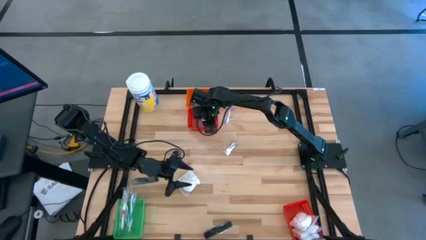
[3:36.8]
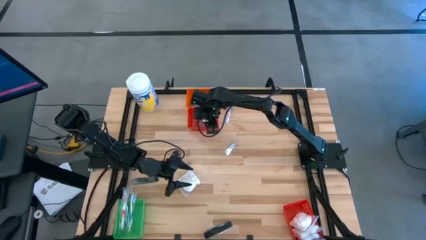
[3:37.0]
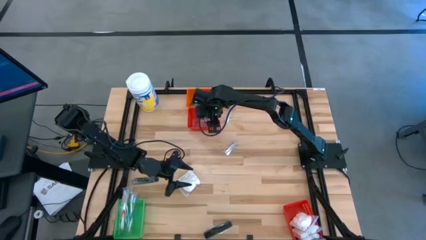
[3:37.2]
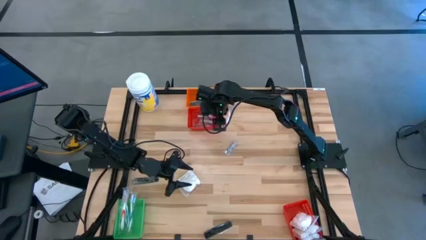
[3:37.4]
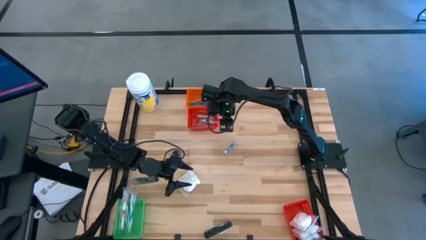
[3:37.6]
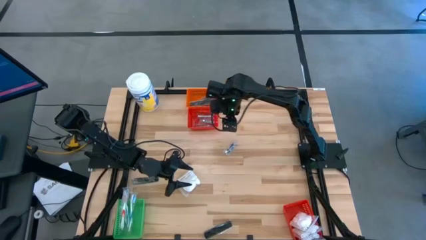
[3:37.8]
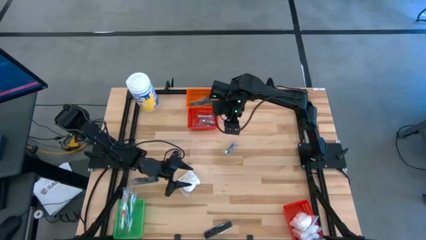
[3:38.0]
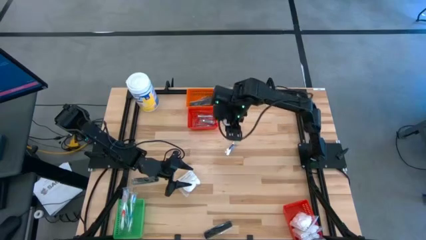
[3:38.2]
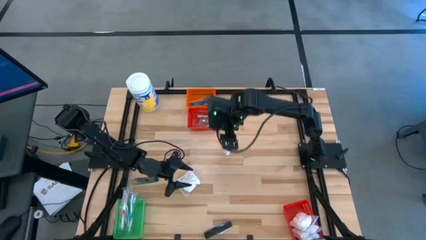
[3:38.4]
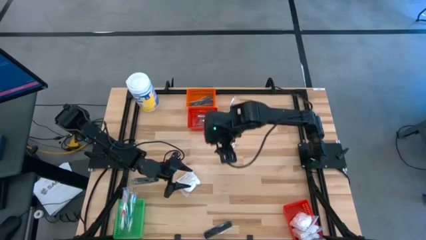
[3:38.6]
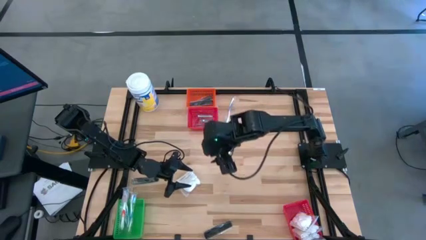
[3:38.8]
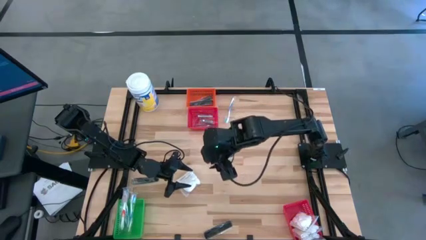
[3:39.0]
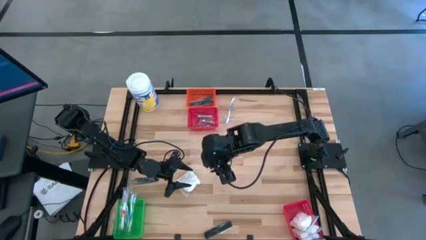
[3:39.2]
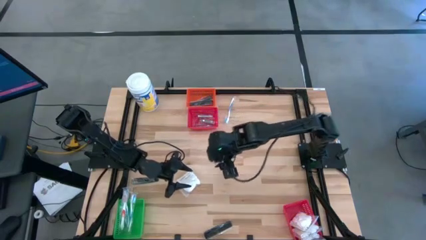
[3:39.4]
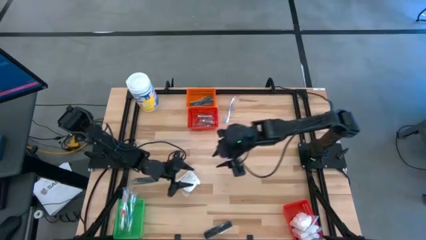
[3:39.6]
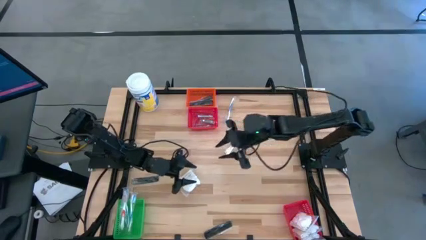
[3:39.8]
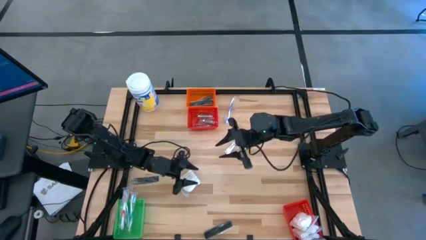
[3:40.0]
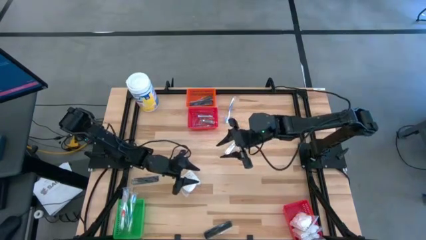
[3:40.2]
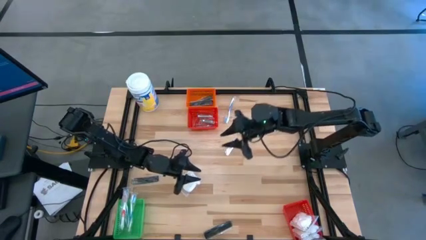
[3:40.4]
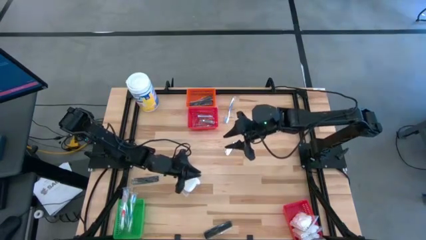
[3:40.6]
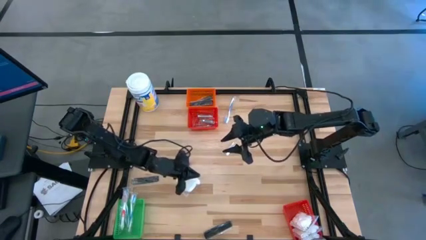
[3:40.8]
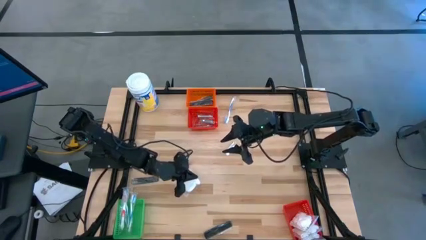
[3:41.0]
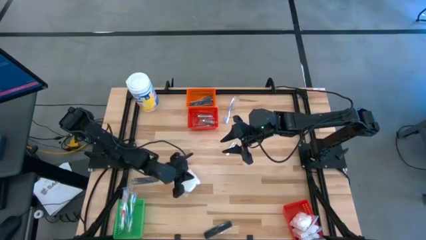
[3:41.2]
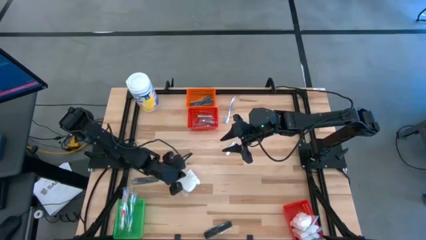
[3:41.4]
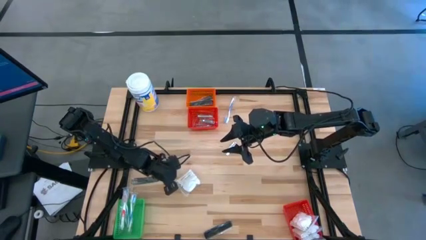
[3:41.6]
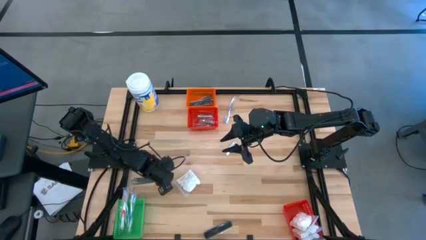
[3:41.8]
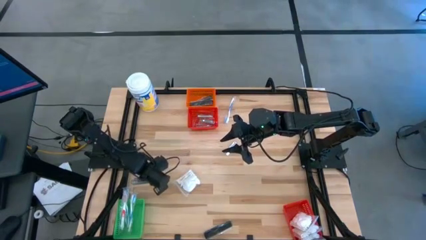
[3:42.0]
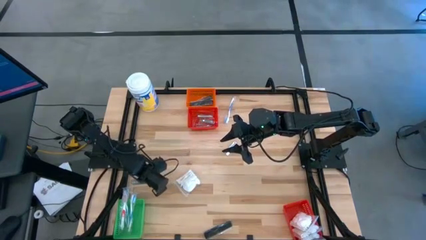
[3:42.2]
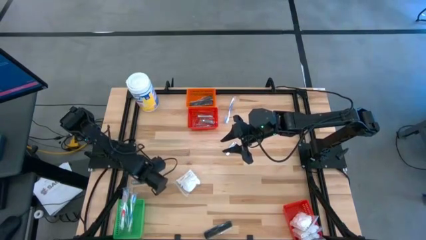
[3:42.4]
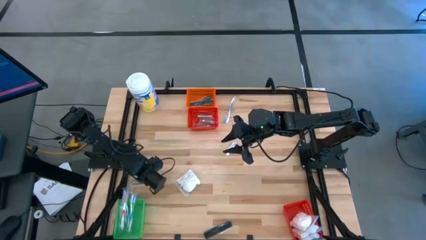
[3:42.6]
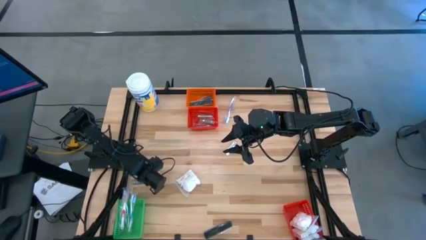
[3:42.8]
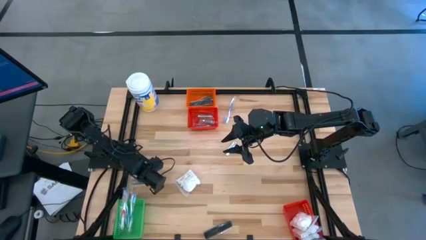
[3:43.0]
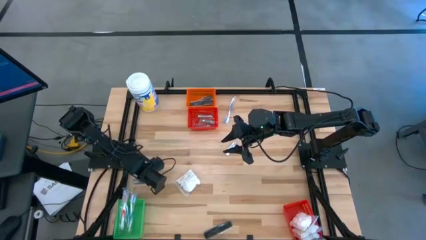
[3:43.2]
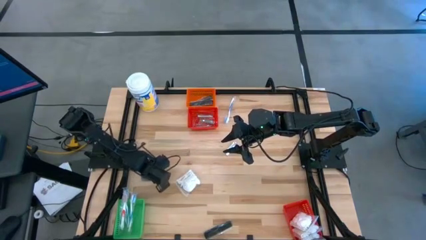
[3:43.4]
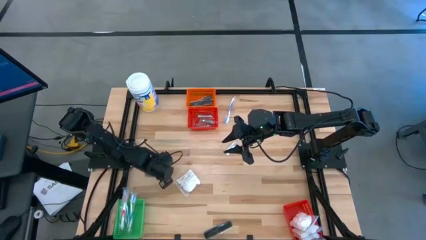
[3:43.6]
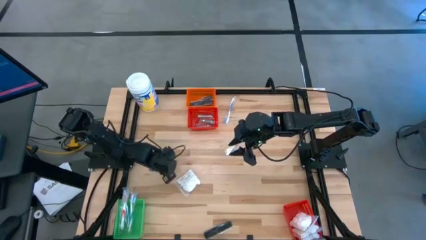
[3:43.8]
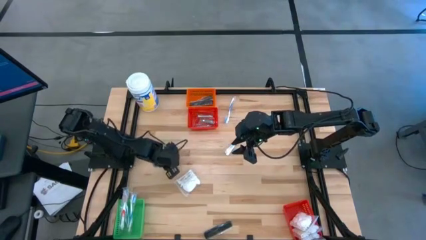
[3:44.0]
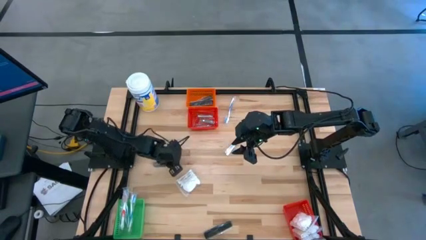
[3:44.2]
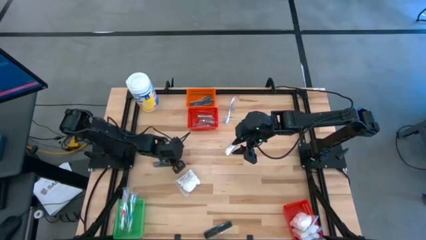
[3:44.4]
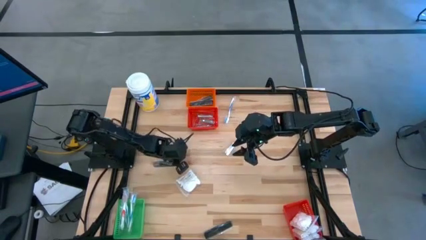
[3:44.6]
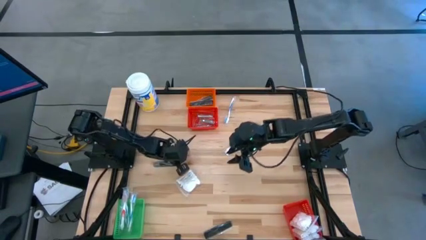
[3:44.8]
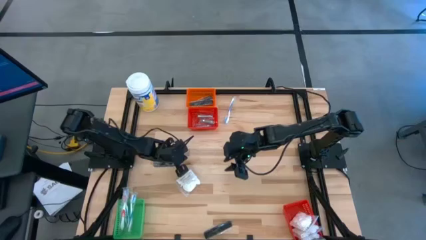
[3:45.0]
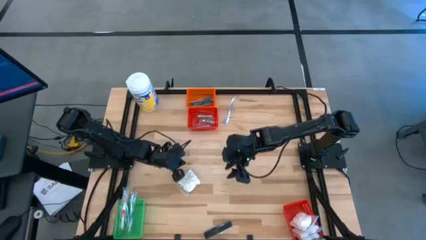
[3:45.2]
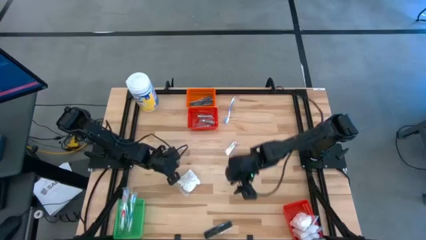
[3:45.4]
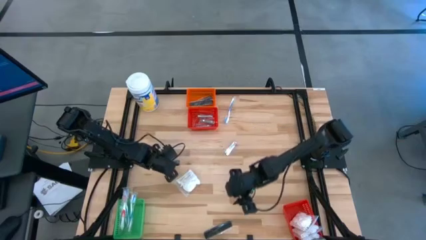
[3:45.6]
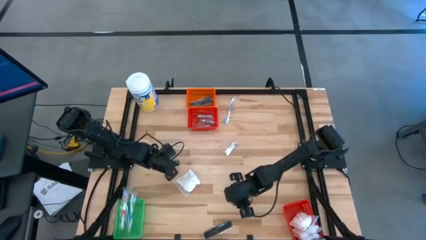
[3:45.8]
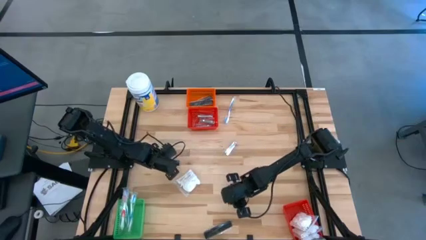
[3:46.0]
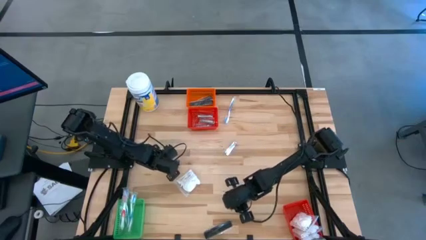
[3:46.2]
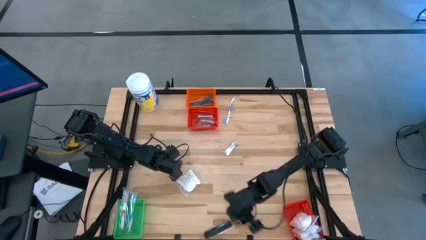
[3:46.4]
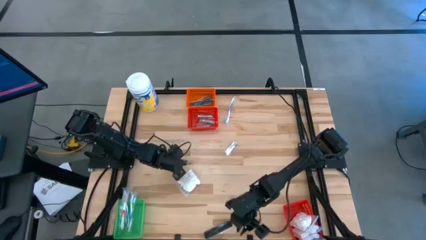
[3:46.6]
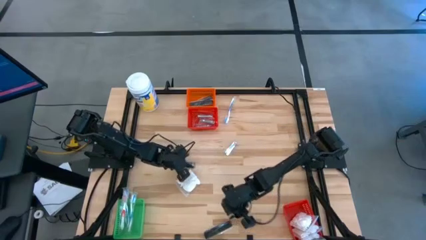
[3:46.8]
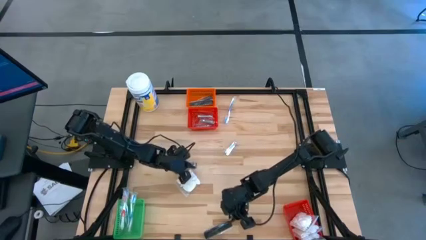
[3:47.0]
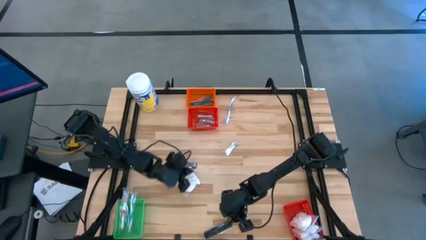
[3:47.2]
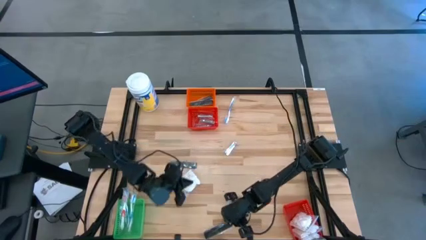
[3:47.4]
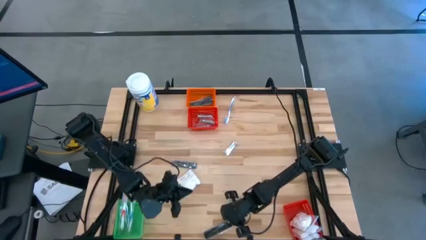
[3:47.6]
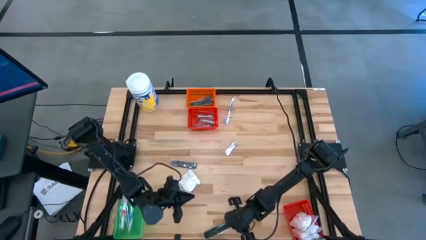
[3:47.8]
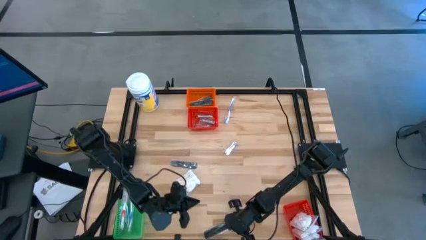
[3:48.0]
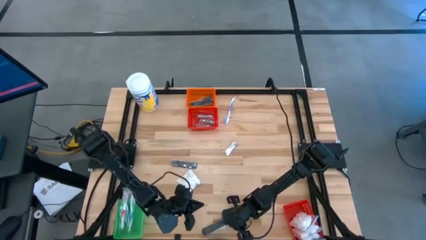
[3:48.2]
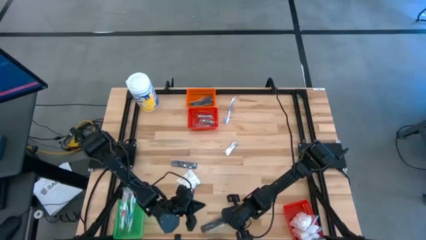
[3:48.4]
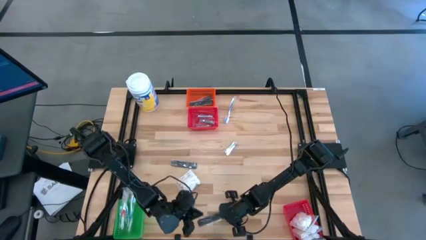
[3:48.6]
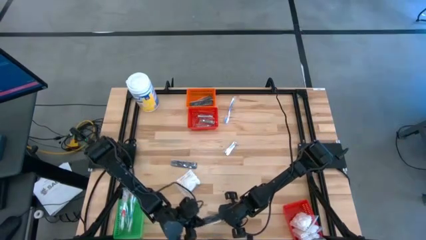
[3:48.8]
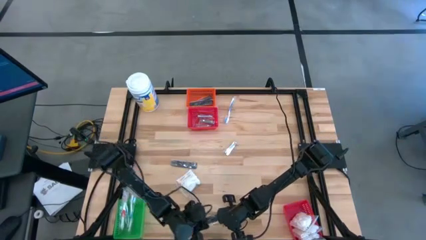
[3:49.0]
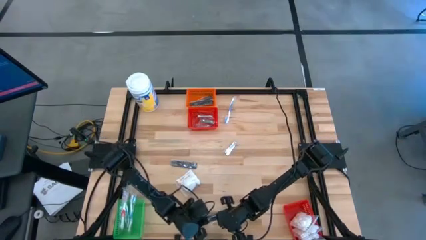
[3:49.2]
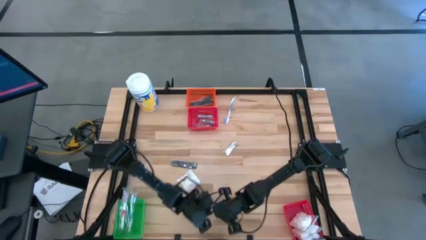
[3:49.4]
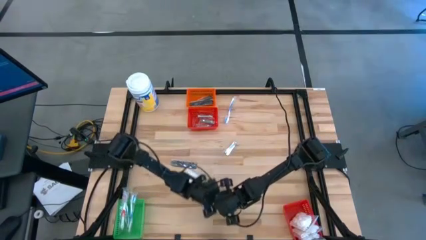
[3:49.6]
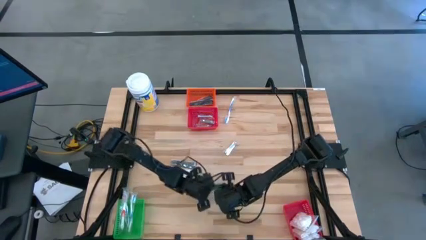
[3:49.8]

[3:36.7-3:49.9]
Task: Pick & Place Travel size toiletries
Move the combs to the center of the table

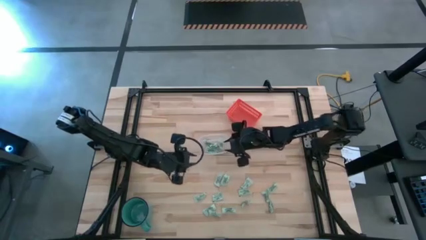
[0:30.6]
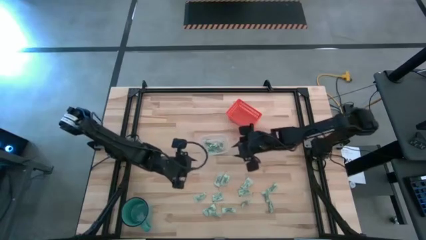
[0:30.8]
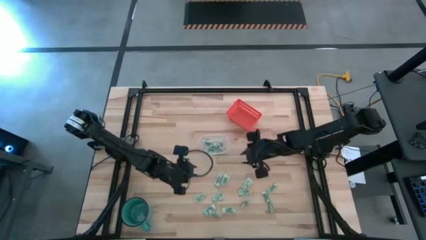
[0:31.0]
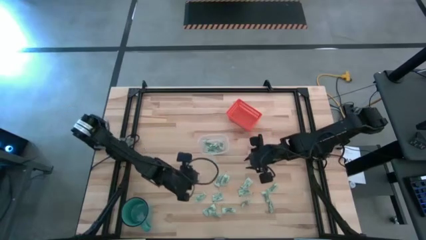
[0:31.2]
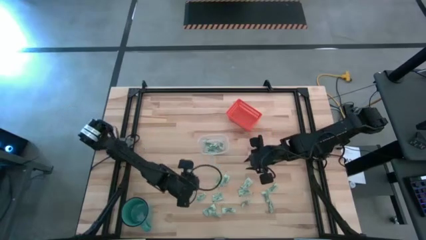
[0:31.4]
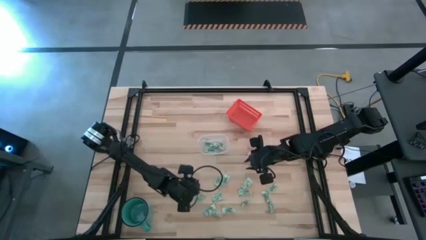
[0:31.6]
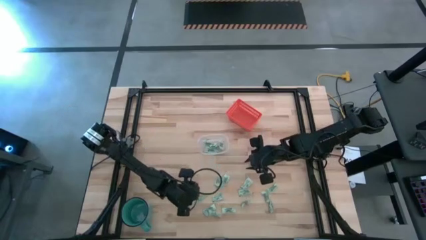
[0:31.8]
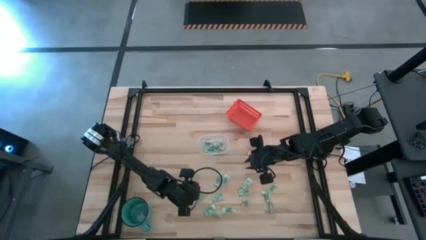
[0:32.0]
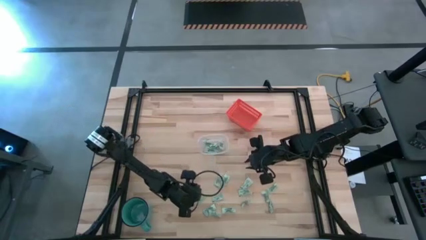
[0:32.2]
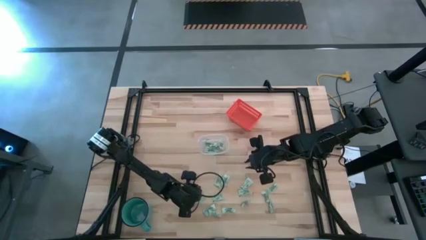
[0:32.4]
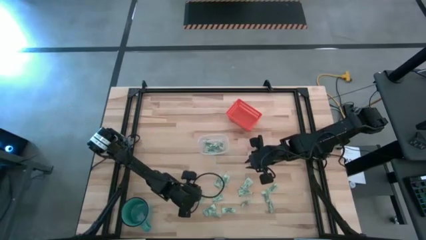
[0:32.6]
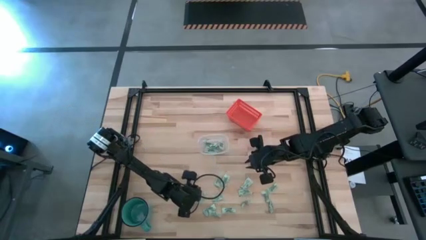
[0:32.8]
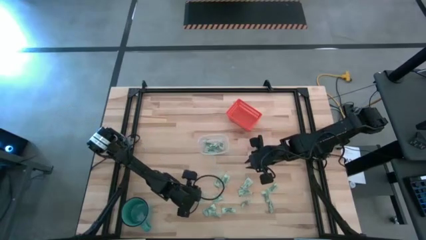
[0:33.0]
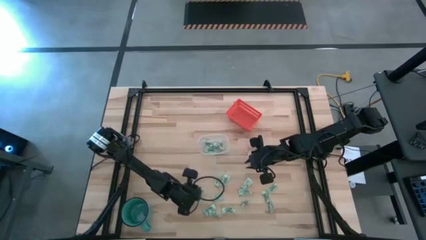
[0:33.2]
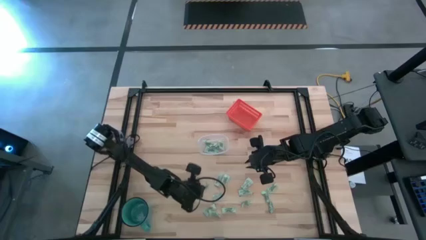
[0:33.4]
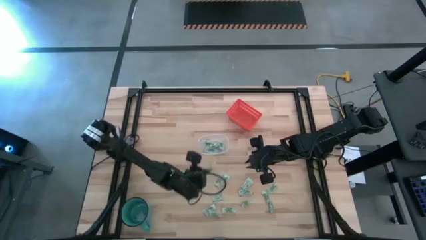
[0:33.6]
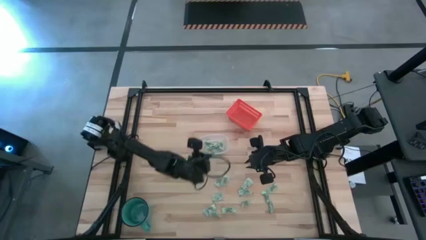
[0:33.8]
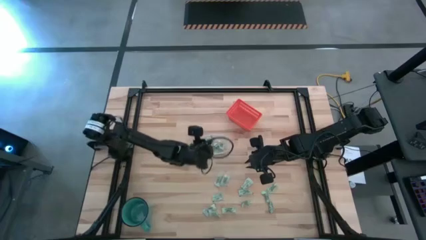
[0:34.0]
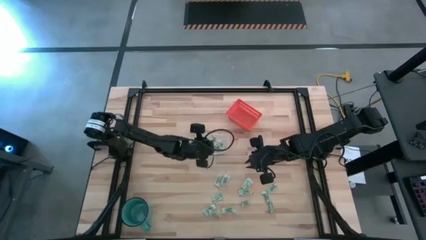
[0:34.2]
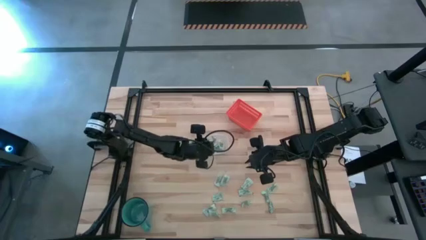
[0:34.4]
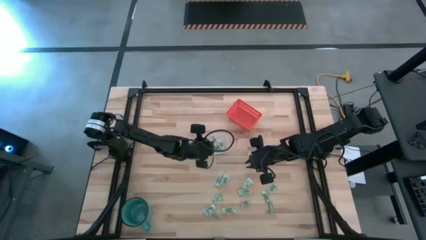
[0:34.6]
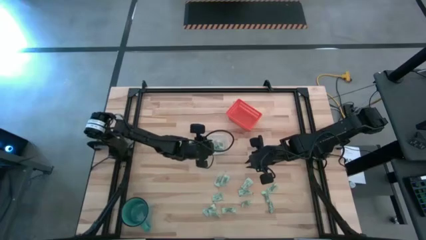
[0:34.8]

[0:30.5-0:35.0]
Task: Pick and place items into bin
Put the stevia packet into the transparent bin
